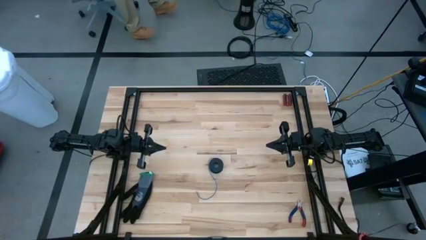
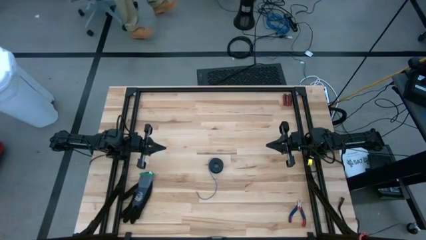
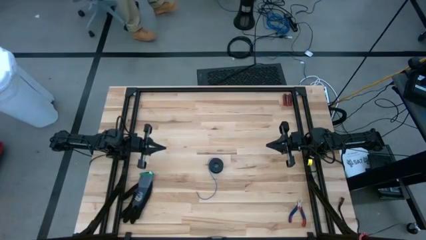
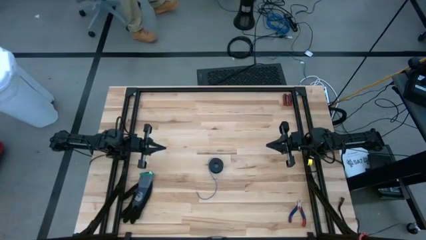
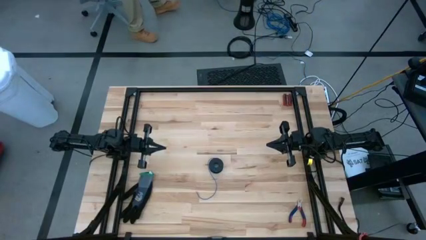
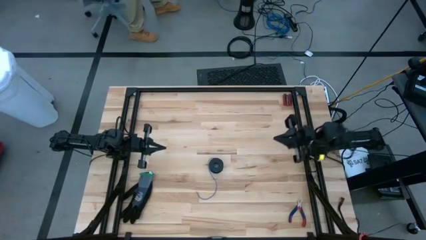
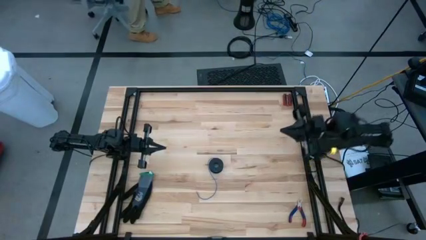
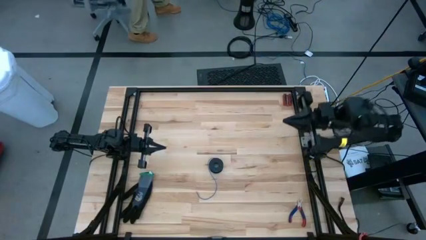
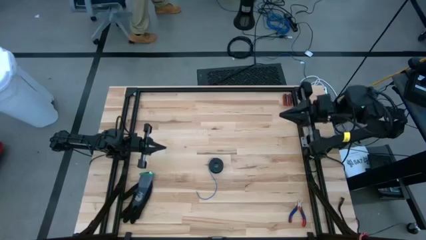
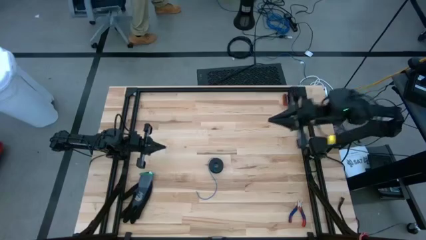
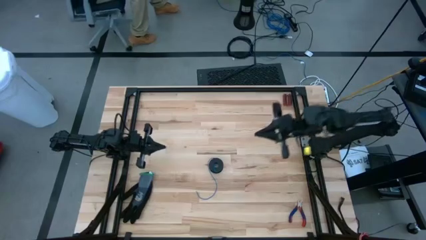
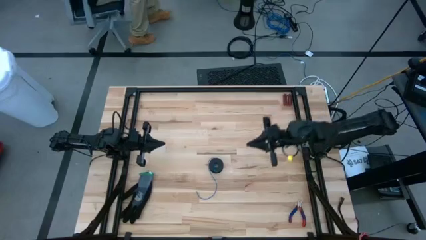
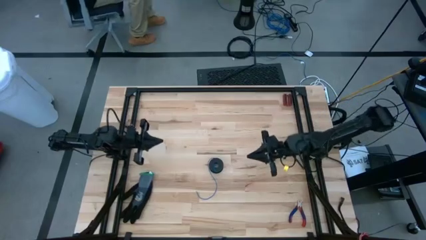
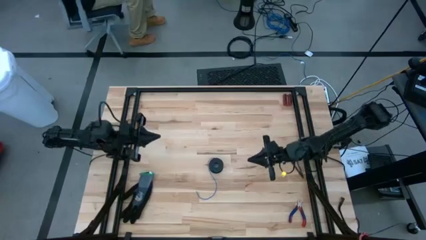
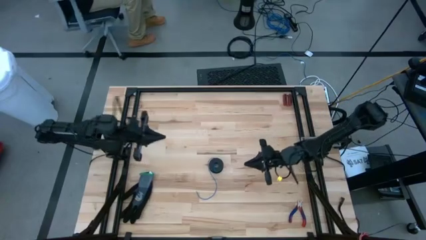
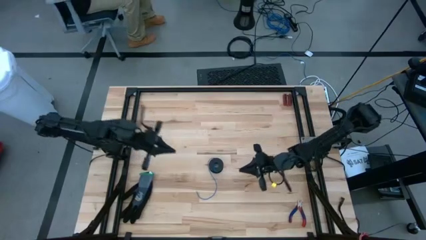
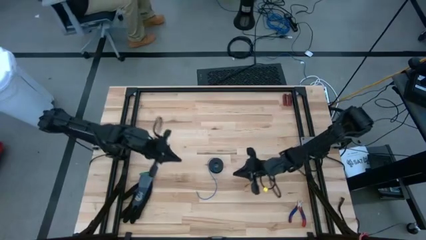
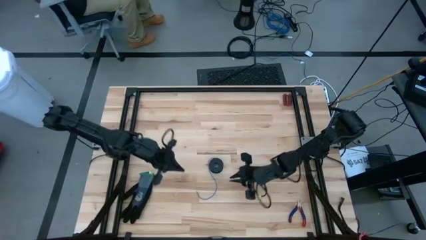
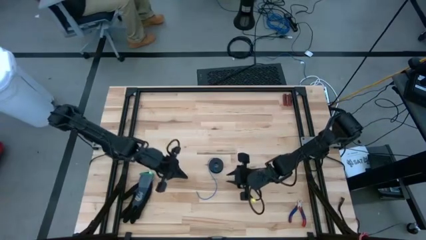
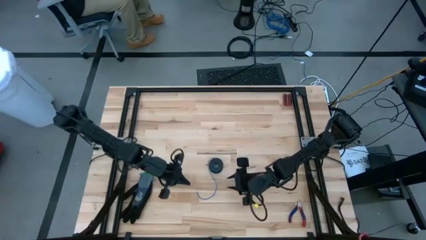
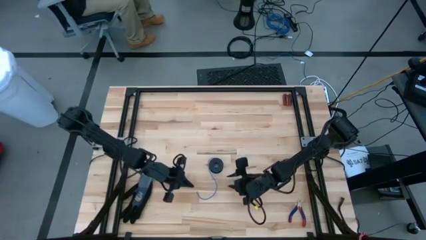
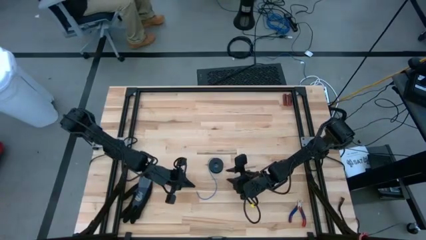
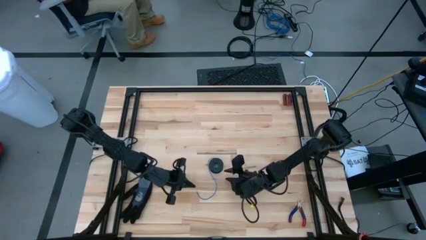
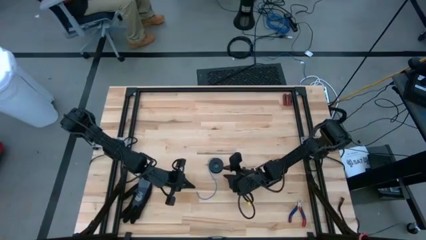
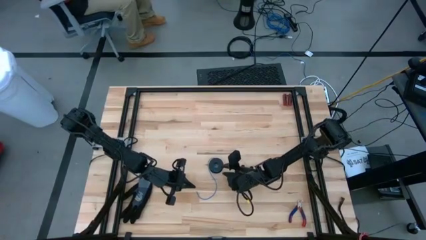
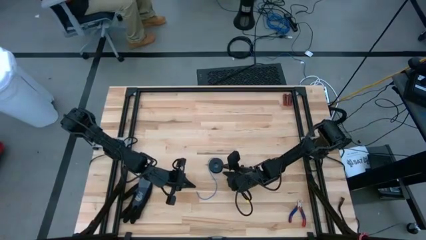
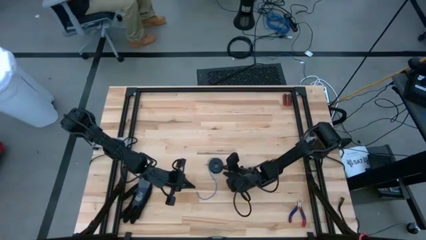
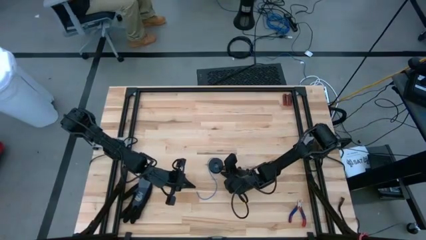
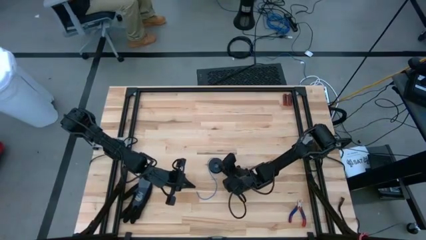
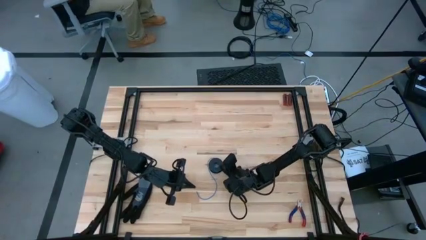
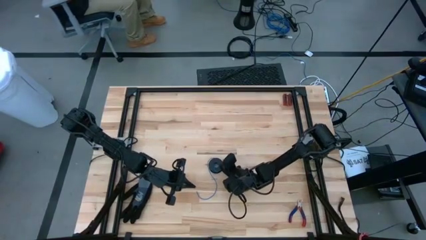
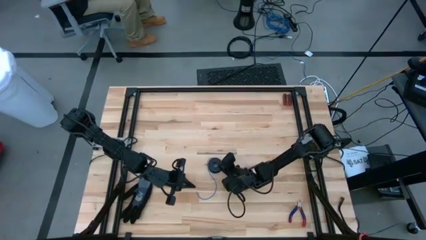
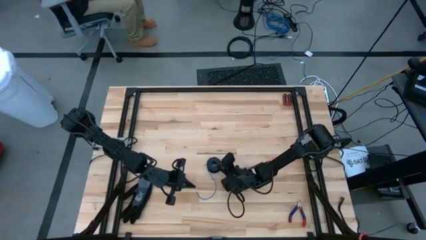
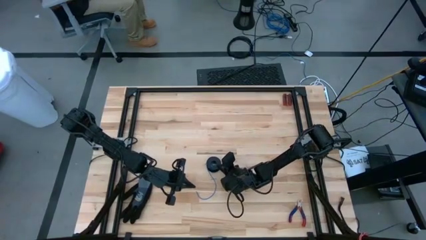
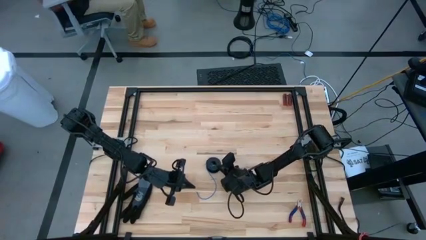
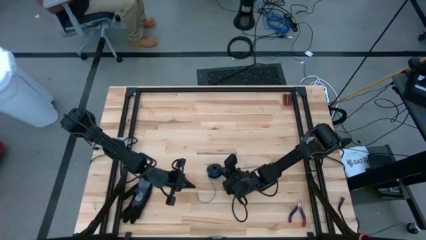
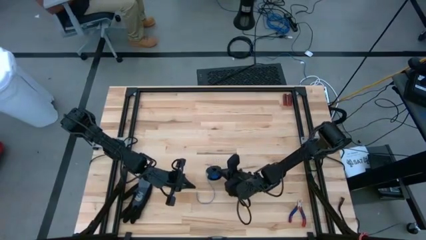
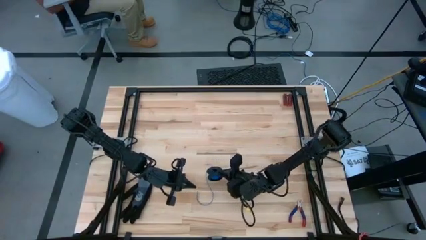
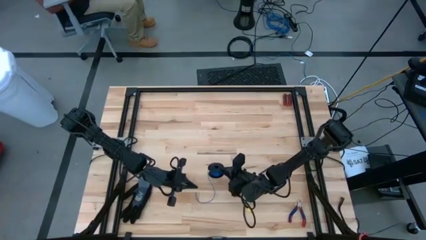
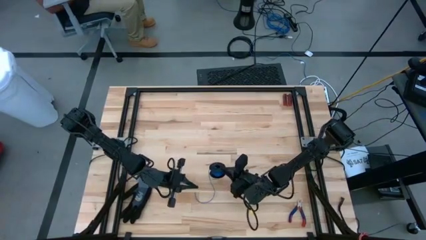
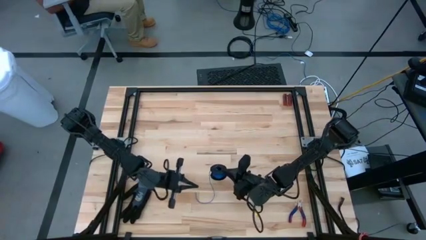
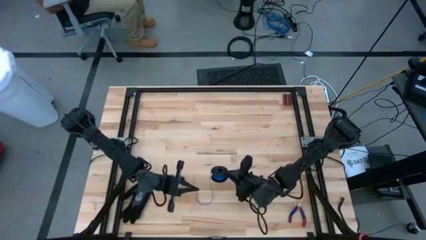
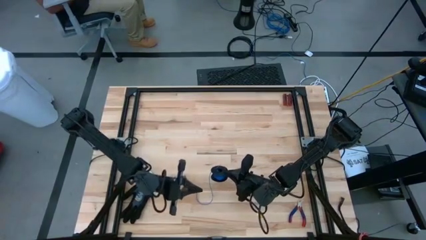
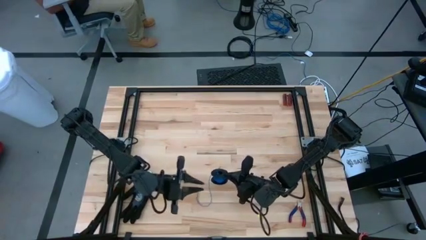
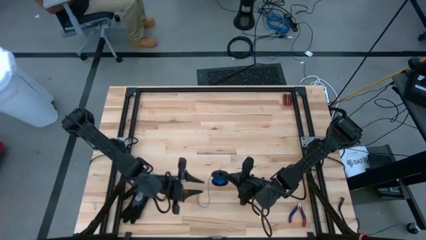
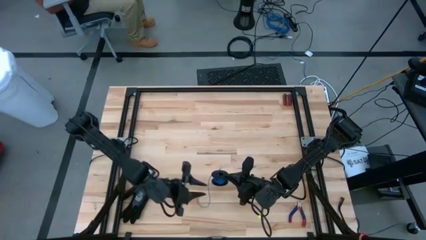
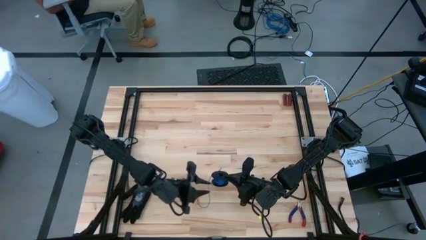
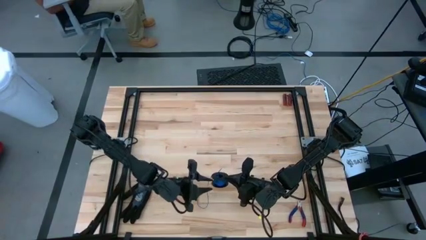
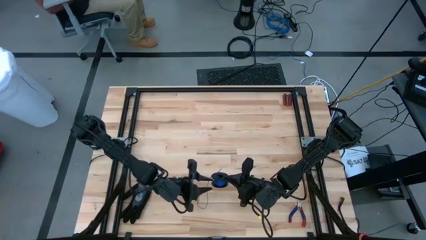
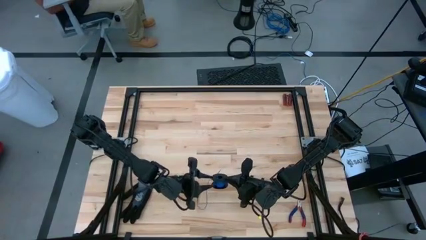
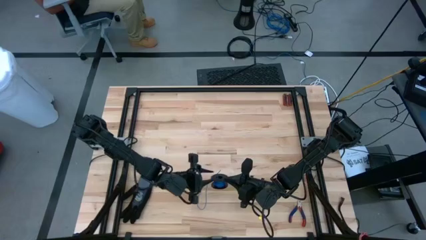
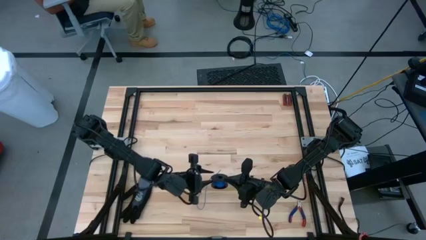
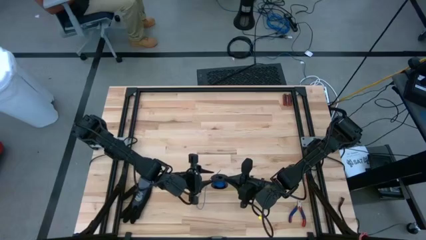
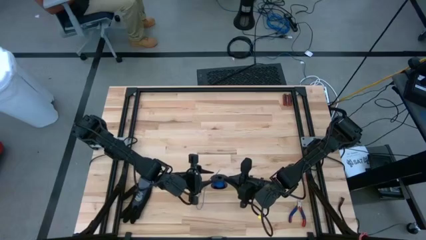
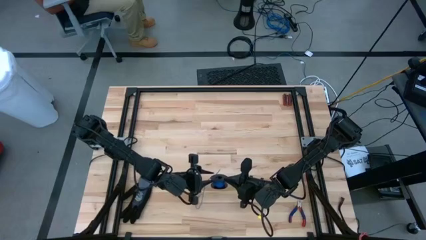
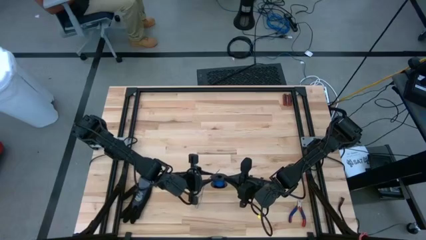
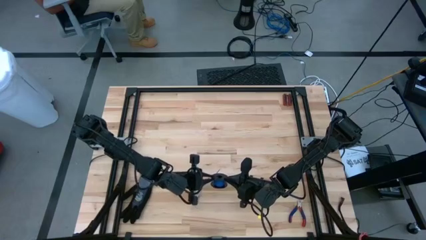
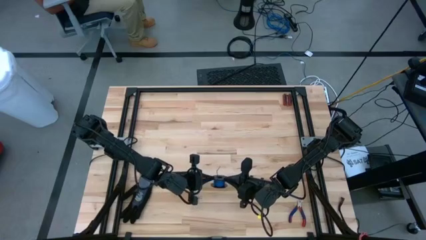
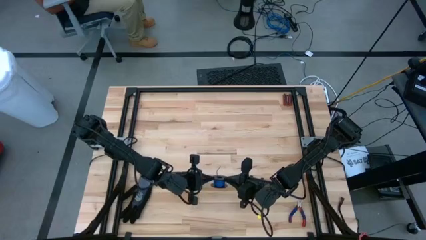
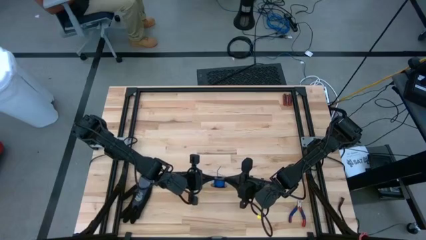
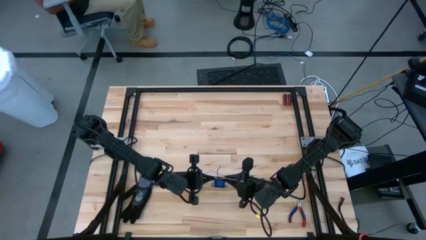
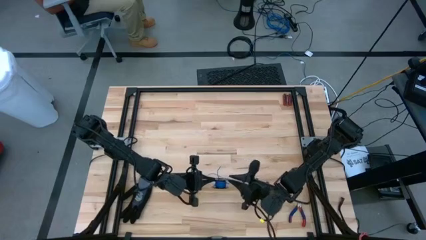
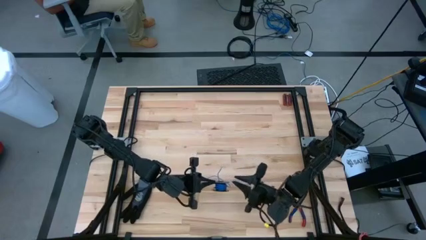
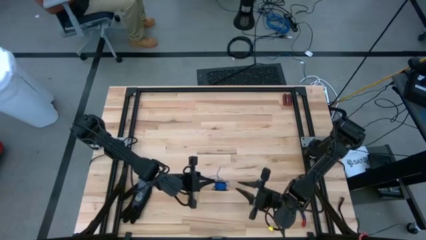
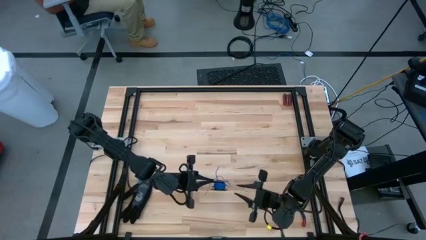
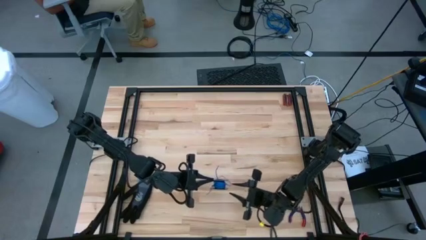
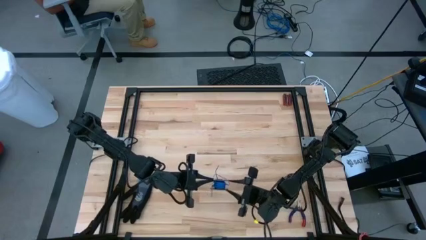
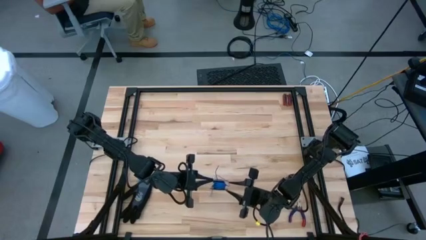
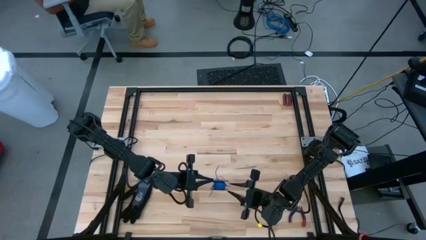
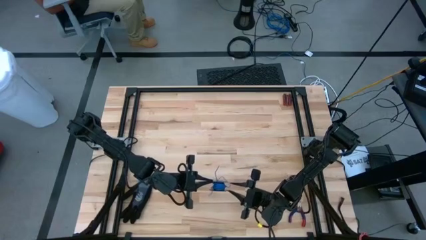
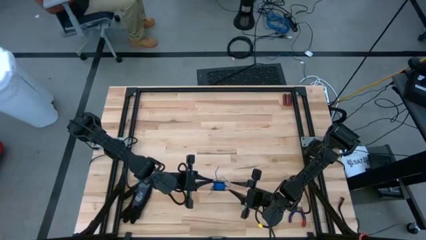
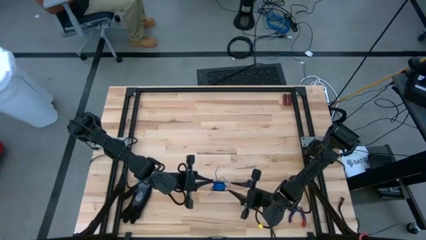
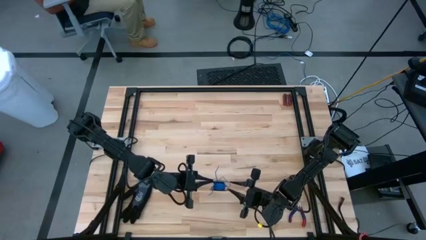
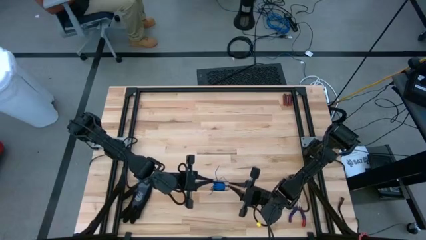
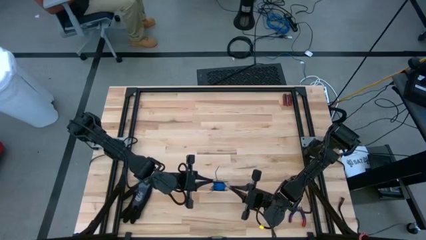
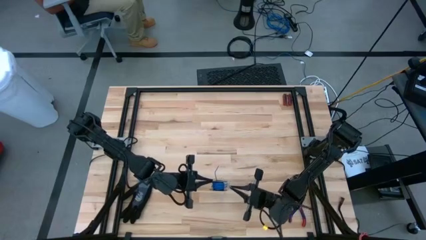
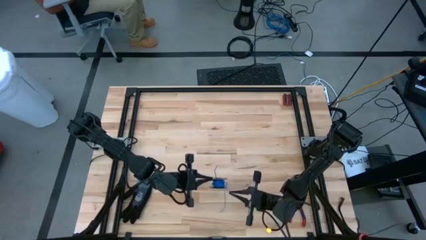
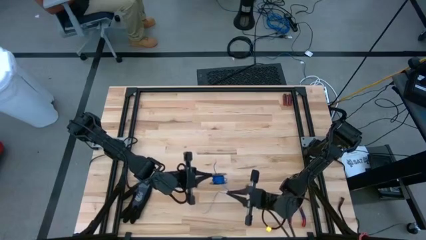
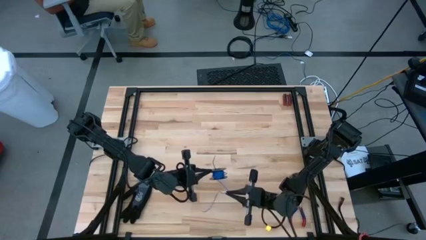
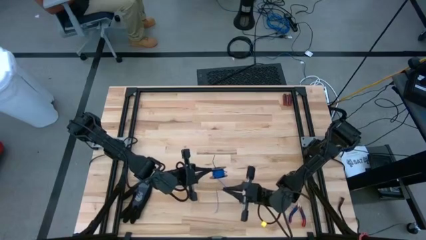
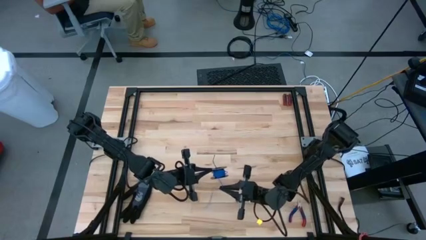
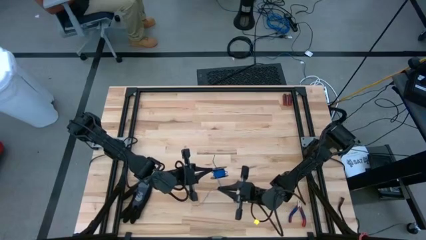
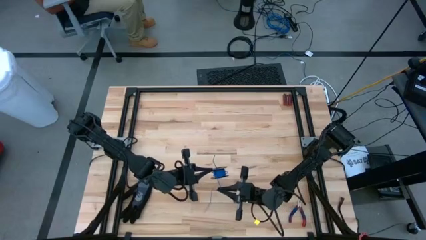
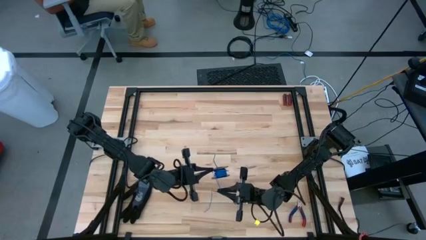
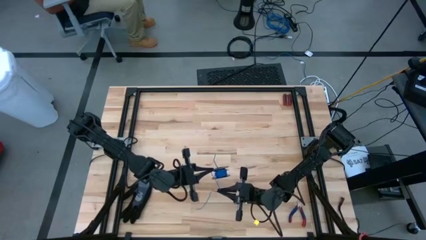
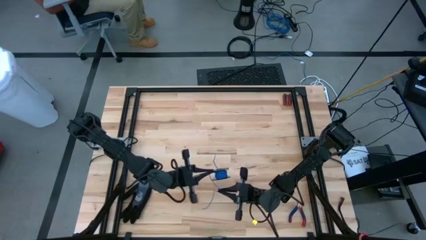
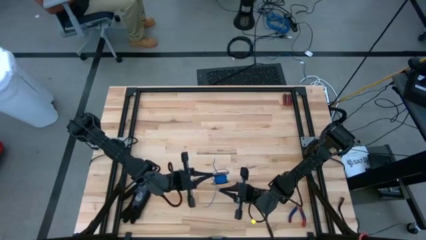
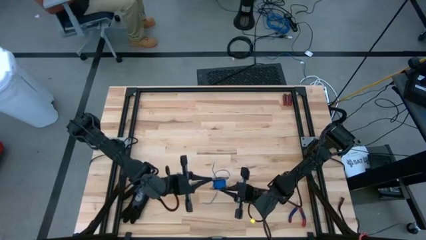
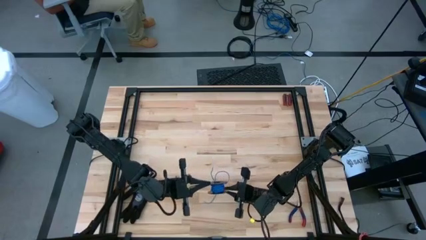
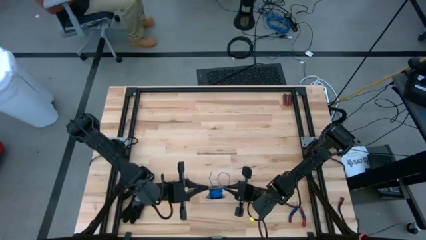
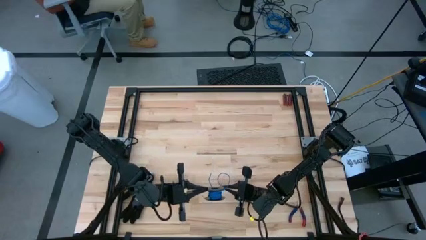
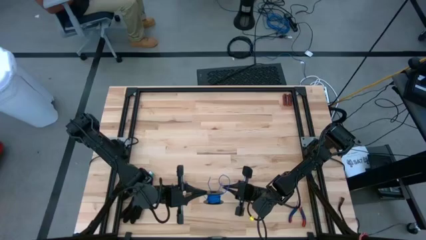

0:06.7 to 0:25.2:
Task: Coil cords
Uncoil the blue wire from the spool
